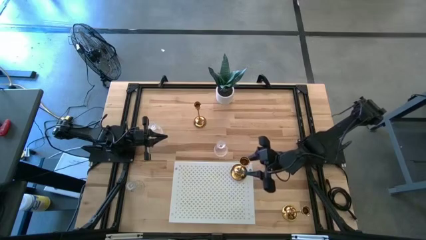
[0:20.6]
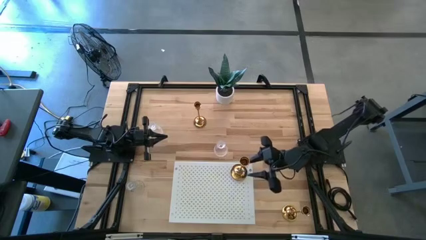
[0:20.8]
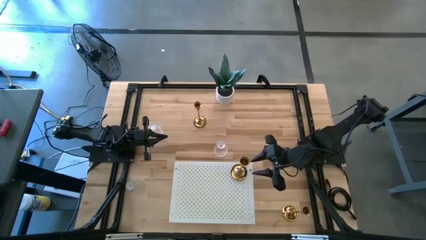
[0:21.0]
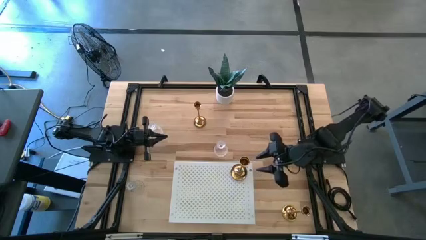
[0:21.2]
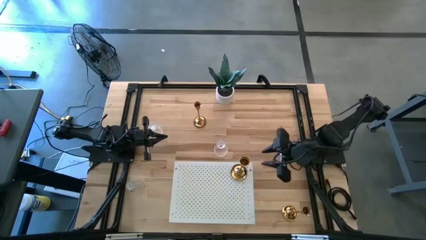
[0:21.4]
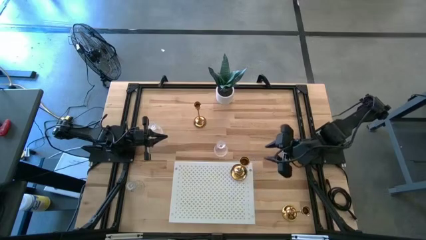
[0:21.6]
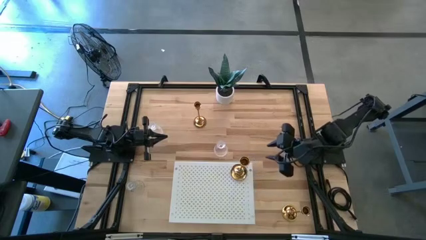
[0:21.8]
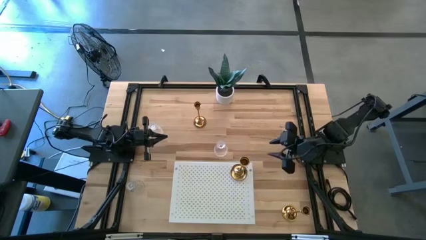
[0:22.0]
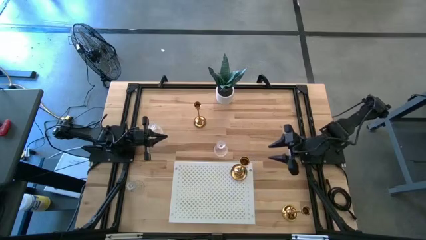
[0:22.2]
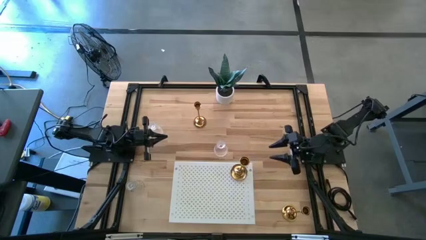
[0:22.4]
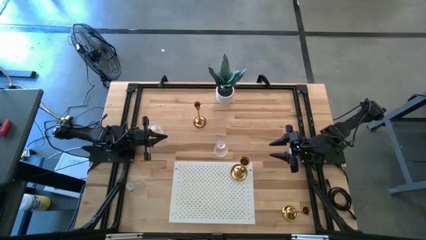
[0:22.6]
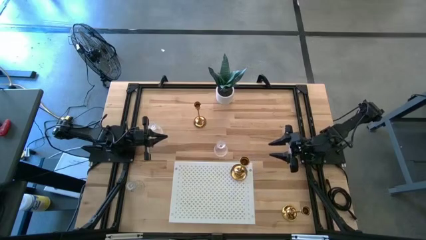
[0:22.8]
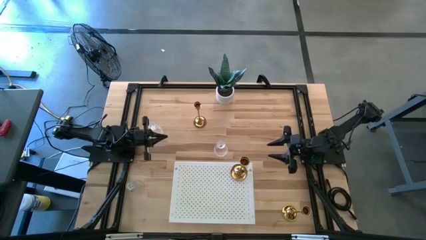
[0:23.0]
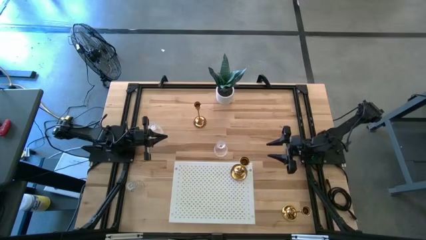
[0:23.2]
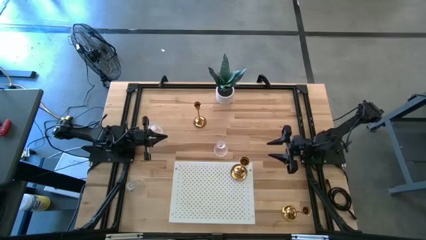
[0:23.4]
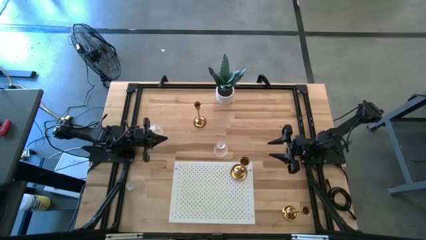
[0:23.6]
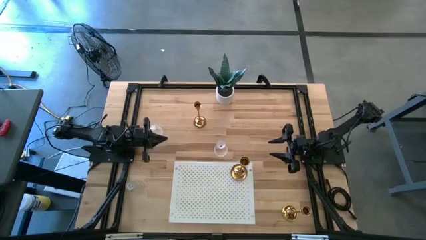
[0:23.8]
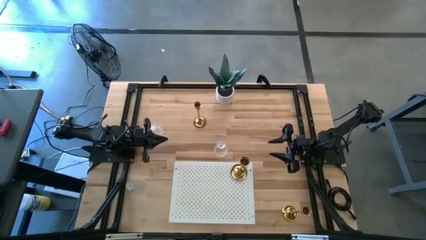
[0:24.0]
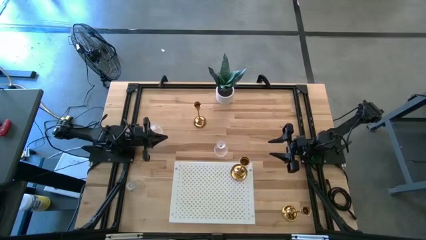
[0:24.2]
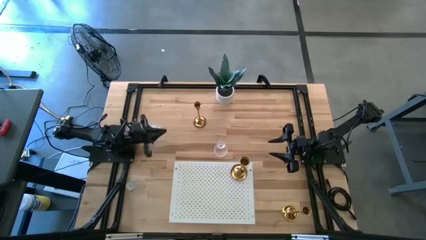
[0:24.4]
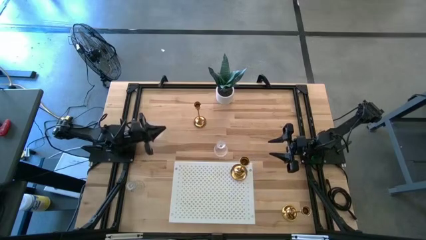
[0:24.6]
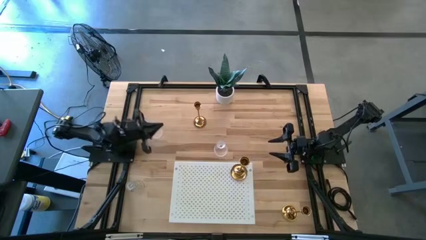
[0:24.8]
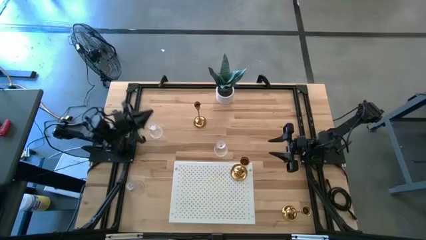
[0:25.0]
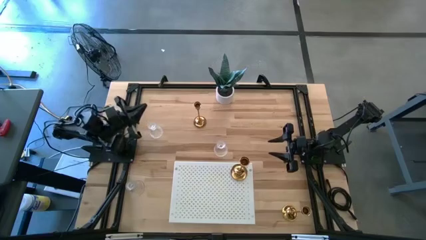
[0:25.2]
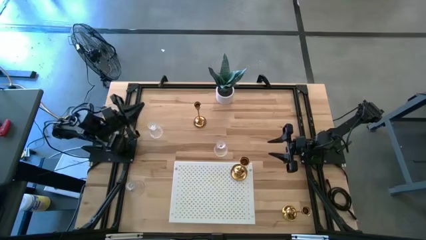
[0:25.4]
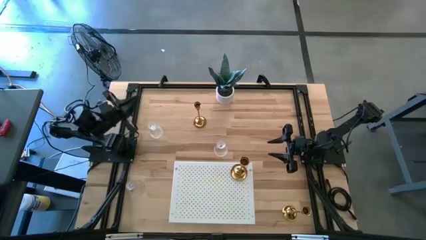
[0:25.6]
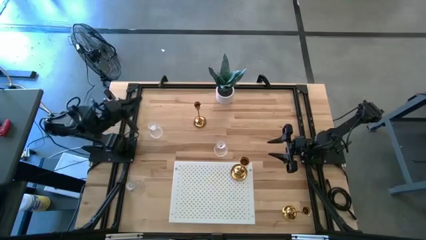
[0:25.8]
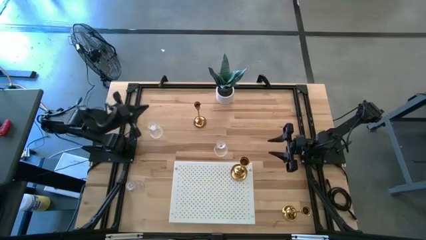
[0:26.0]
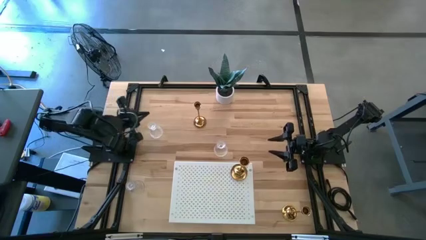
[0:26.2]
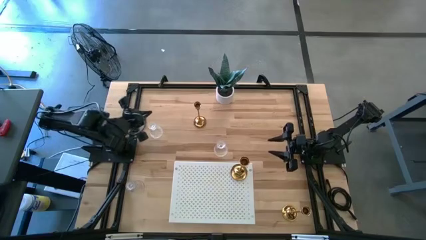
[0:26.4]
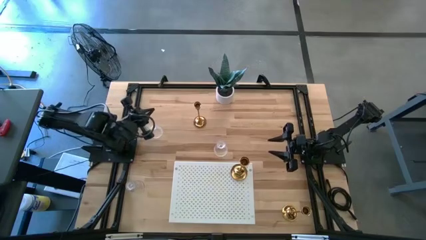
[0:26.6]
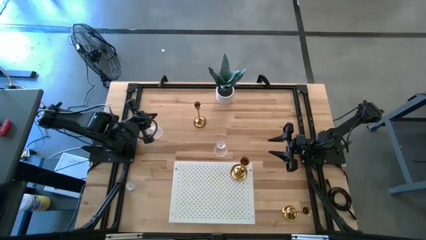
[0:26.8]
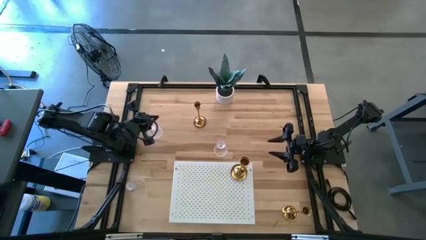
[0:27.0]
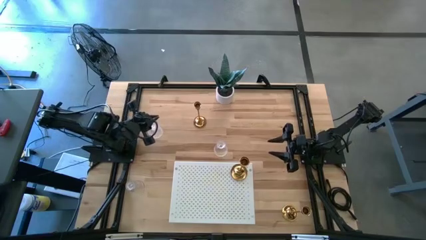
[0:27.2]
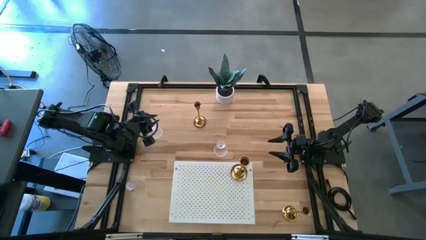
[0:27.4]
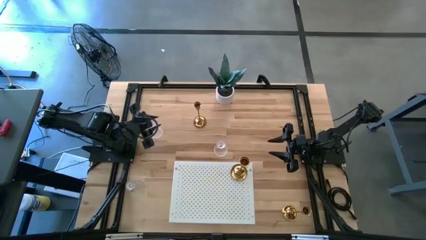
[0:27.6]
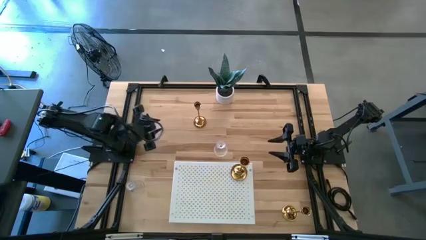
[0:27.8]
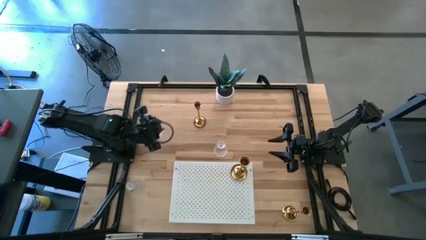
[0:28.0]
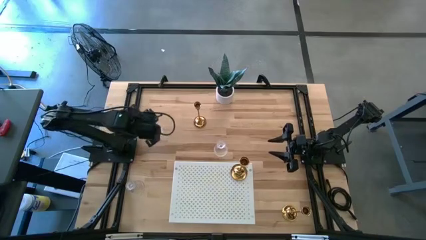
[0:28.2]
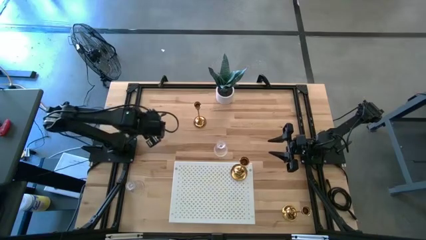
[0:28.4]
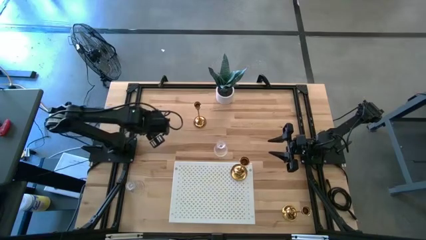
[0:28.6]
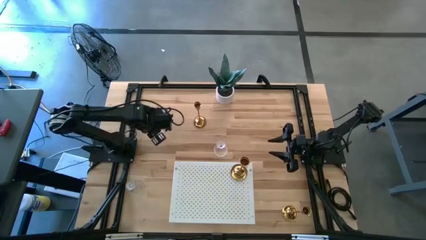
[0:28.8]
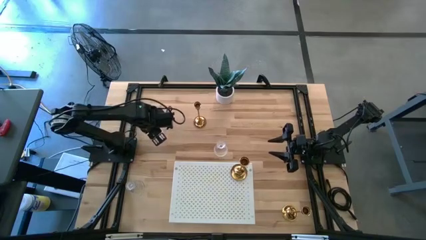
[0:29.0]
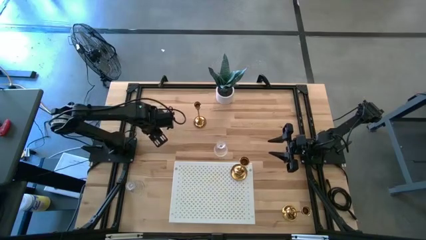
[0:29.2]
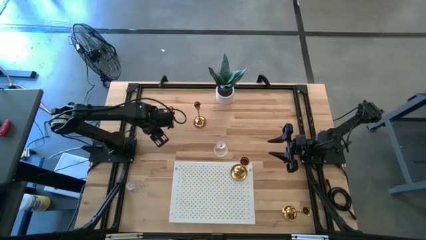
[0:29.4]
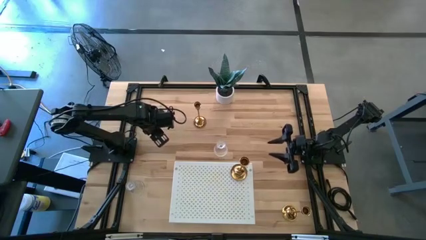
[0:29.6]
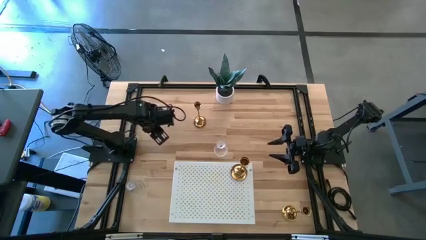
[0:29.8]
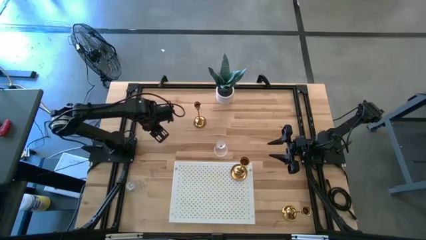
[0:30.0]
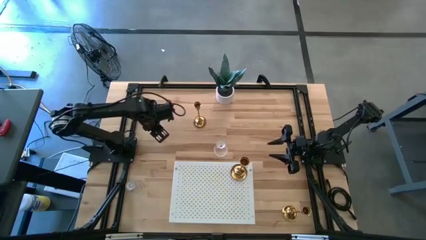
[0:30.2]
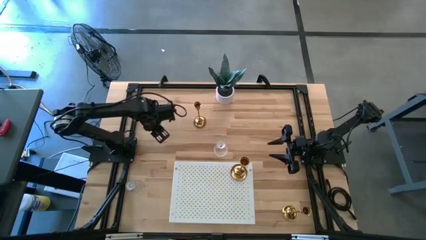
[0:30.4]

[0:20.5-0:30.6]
Task: Pick & Place candle stick holders
Put the top left glass candle holder on the shelf

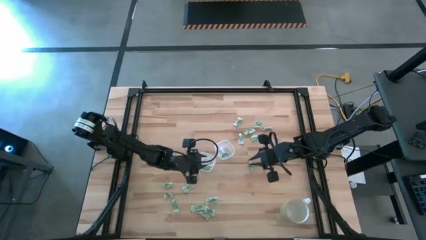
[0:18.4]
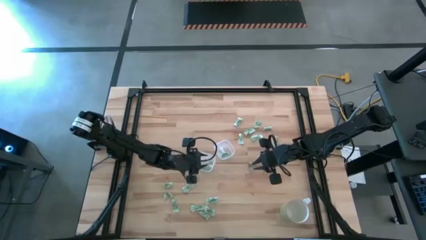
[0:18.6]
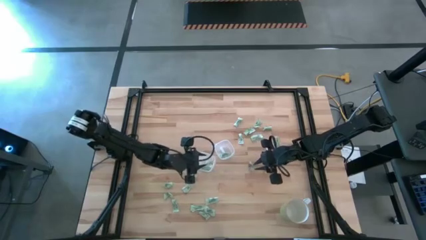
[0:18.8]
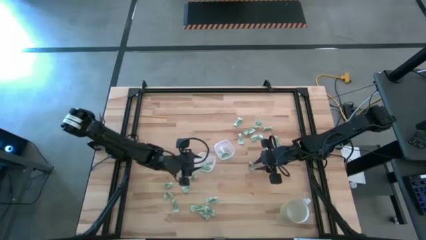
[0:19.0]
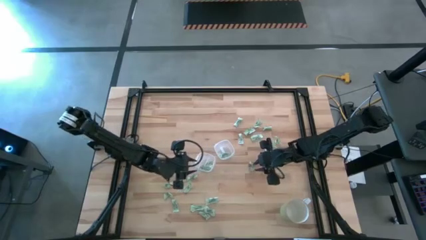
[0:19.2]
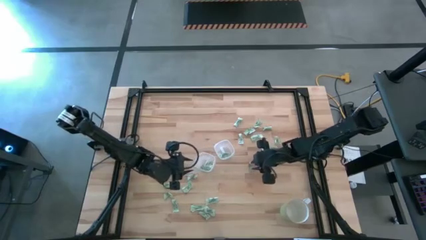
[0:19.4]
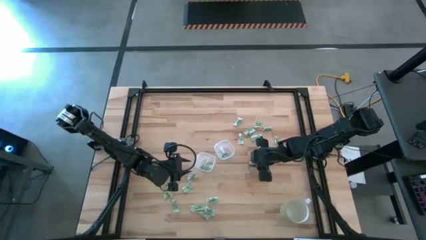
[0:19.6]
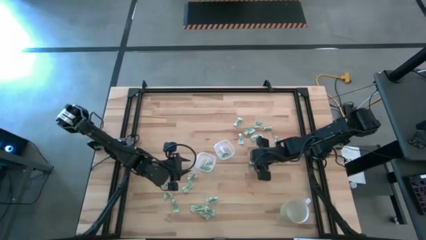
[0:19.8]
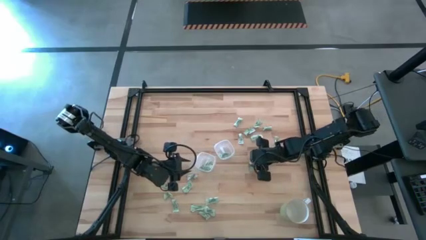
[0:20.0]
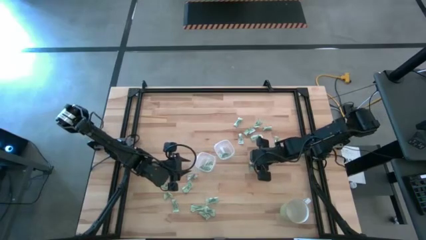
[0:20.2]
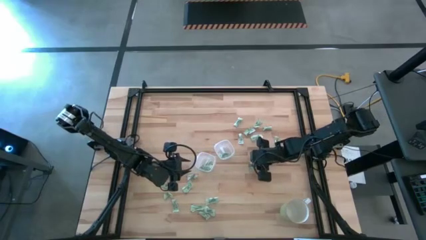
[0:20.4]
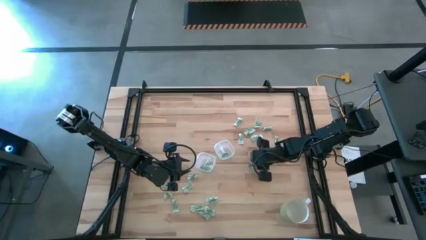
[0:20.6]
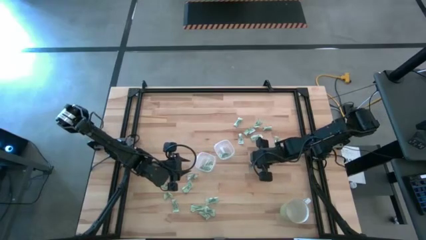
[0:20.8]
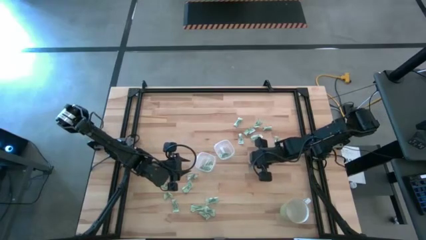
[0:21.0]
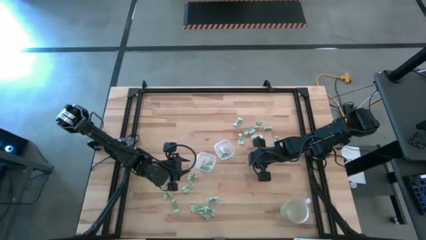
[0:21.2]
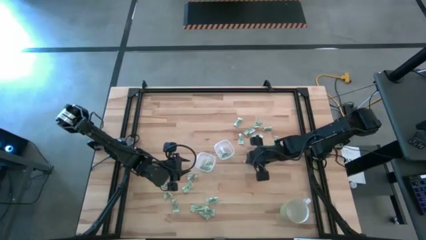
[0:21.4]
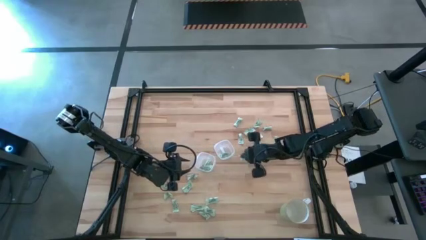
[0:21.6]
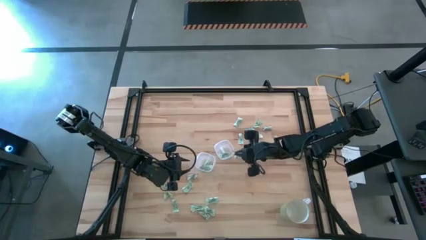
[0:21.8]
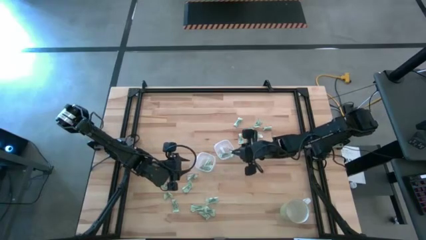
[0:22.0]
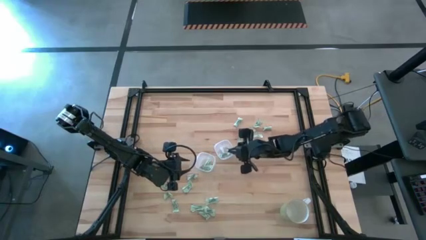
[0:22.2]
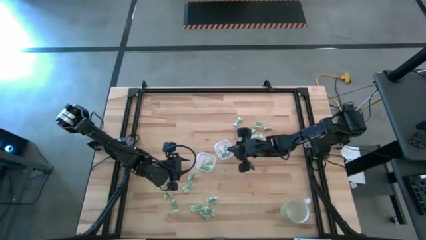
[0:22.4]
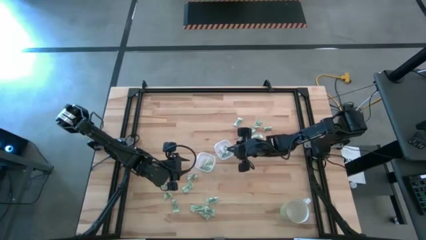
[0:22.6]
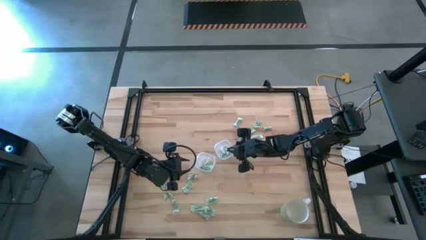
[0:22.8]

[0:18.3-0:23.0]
Task: Pick and place items into bin
Put the stevia packet into the right bin

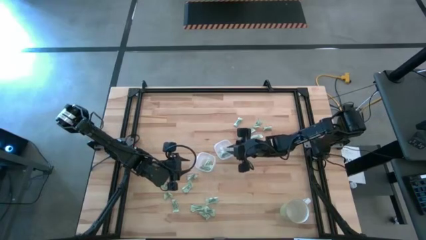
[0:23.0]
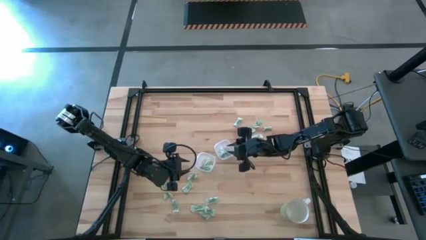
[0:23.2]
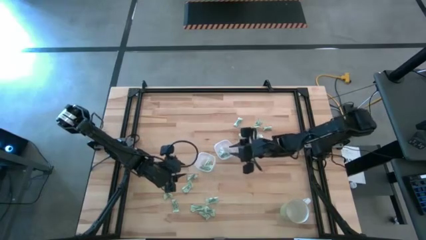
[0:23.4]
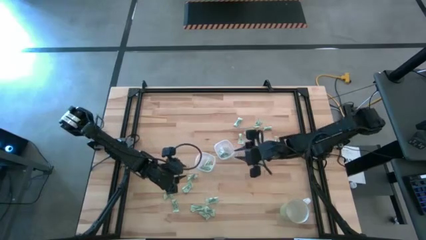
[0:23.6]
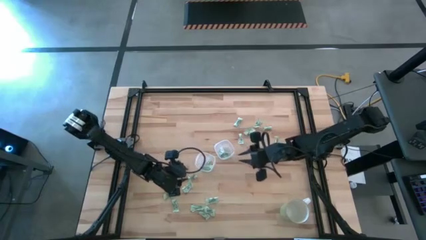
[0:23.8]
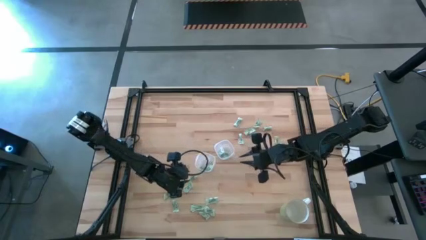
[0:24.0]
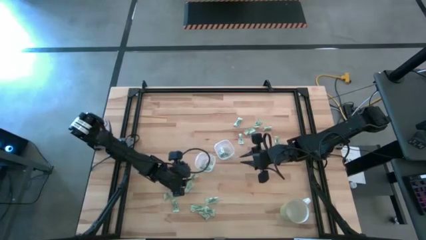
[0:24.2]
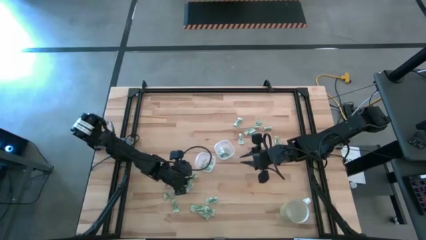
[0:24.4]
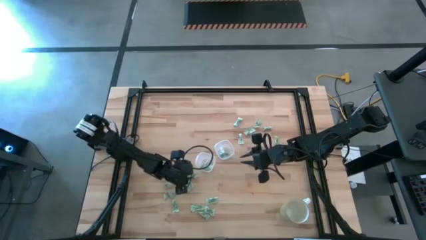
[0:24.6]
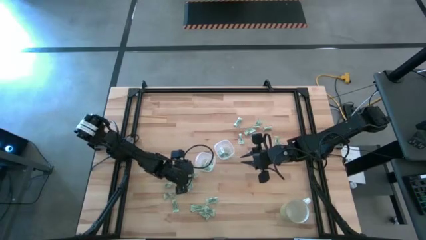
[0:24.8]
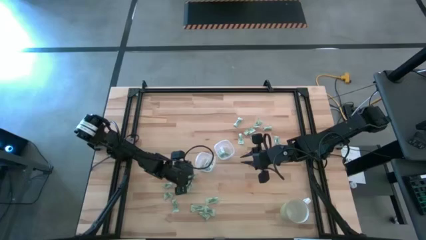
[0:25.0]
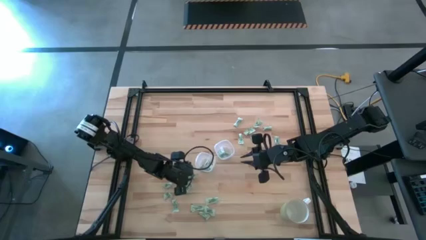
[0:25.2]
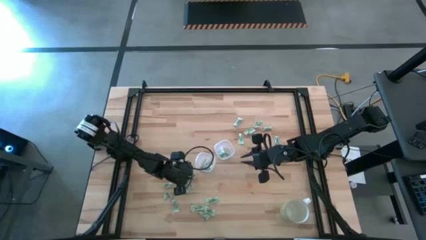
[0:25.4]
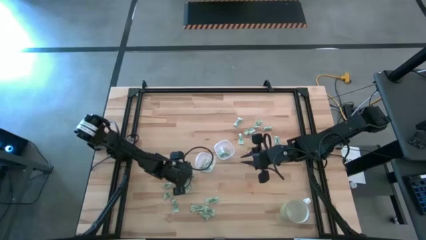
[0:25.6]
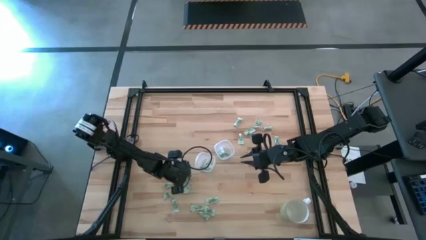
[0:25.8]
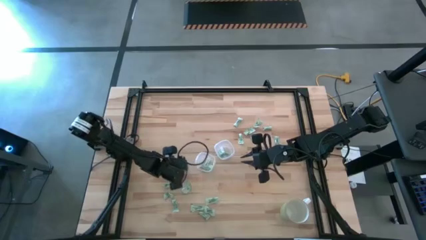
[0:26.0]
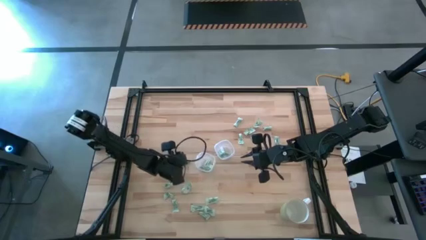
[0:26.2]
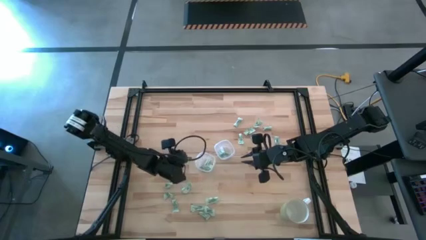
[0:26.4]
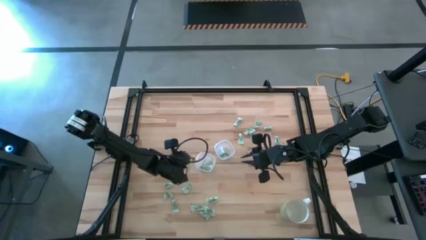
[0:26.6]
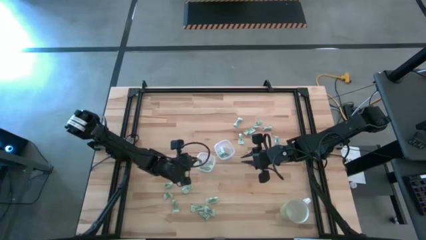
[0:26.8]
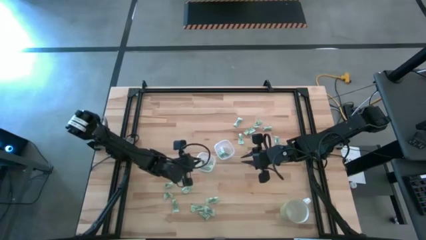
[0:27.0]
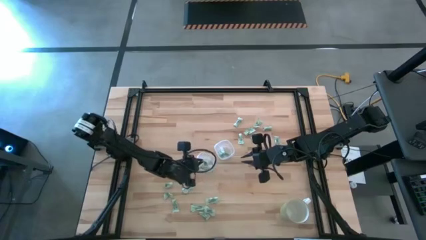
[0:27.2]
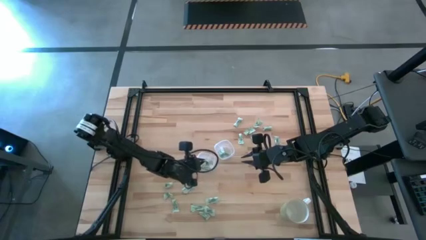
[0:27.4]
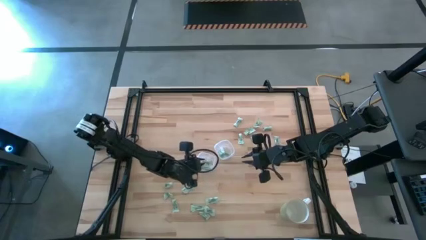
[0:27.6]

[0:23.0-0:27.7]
Put the stevia packet into the left bin
